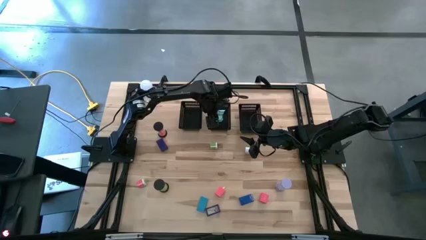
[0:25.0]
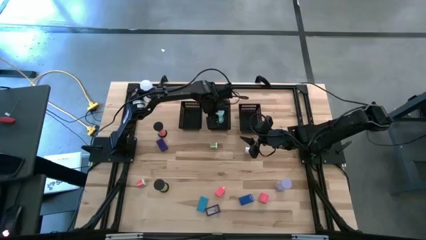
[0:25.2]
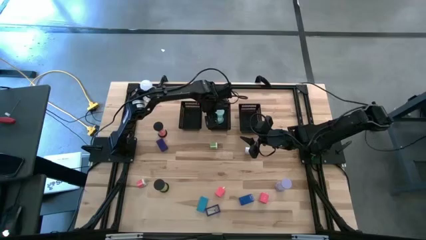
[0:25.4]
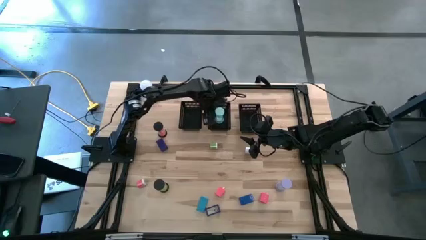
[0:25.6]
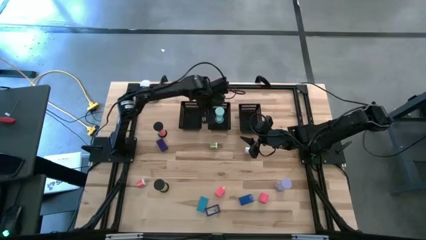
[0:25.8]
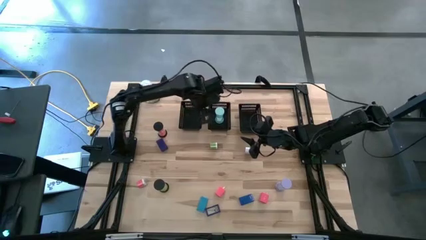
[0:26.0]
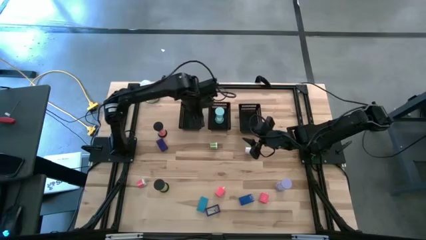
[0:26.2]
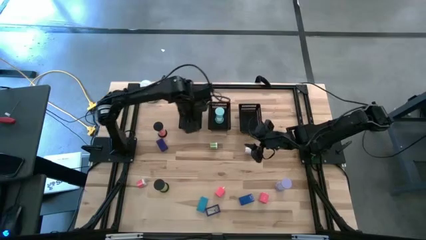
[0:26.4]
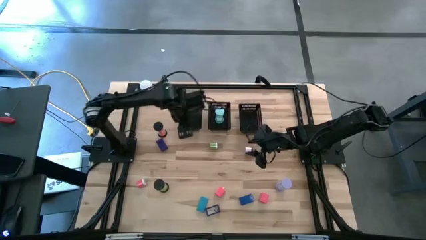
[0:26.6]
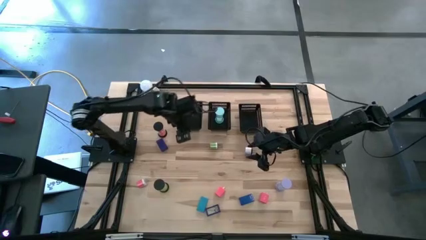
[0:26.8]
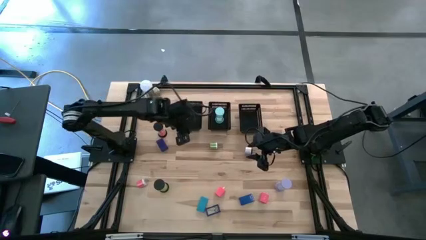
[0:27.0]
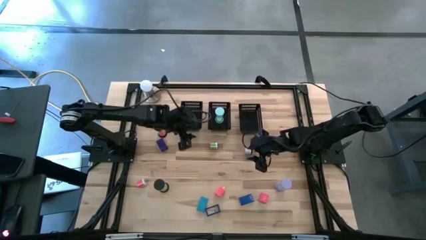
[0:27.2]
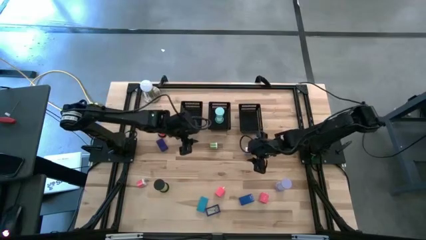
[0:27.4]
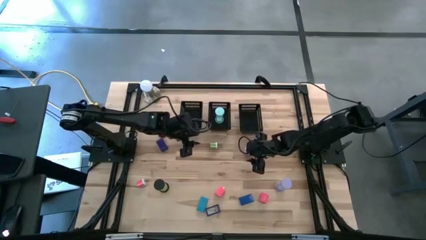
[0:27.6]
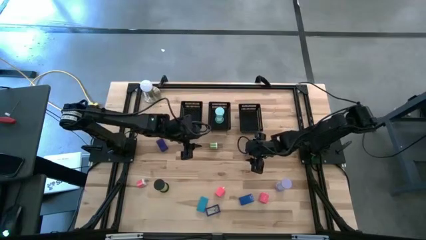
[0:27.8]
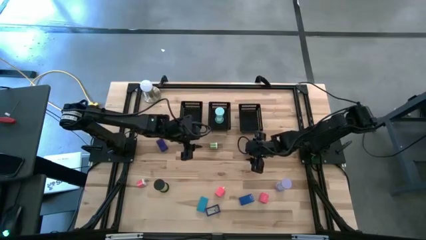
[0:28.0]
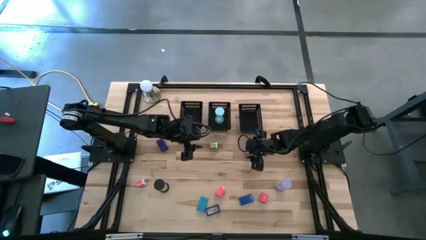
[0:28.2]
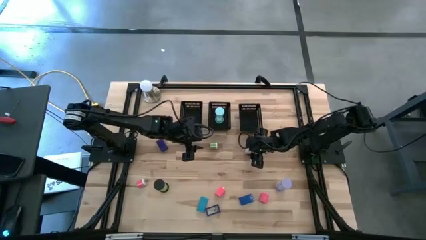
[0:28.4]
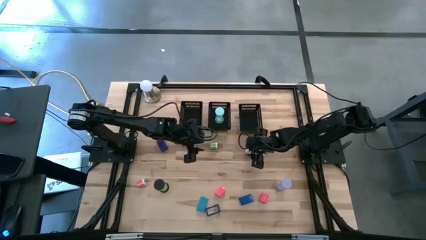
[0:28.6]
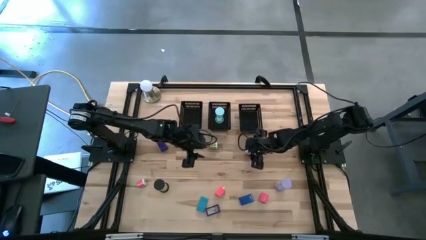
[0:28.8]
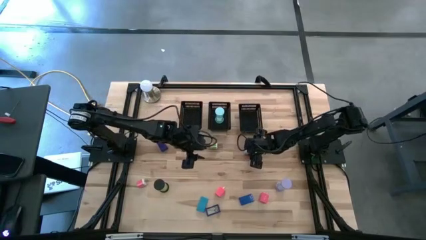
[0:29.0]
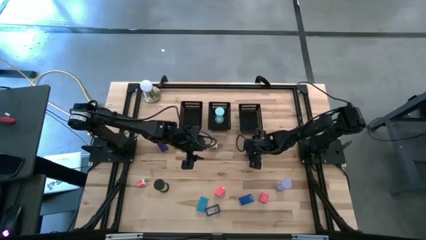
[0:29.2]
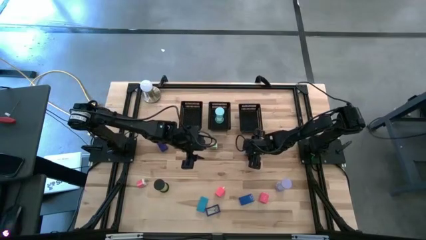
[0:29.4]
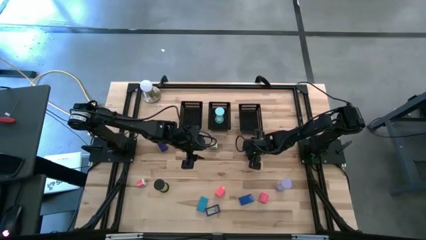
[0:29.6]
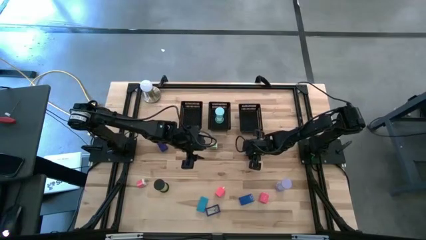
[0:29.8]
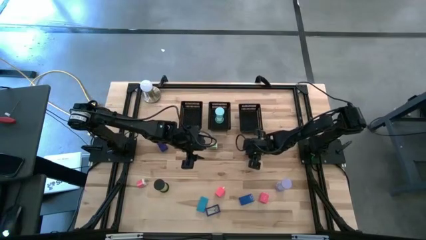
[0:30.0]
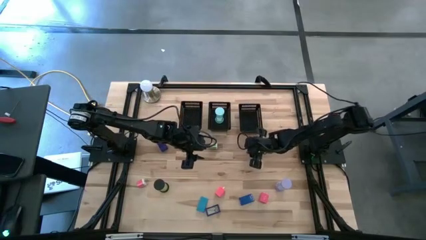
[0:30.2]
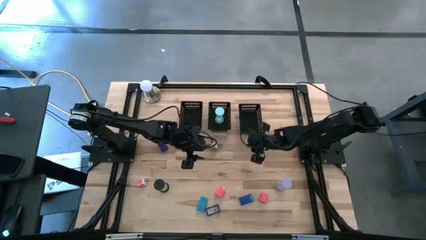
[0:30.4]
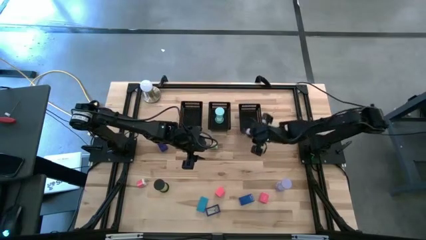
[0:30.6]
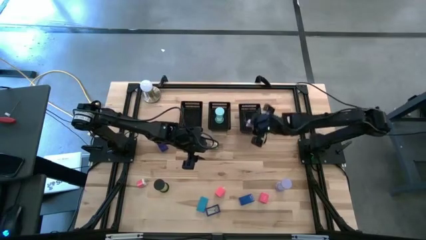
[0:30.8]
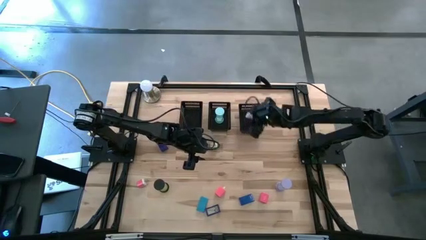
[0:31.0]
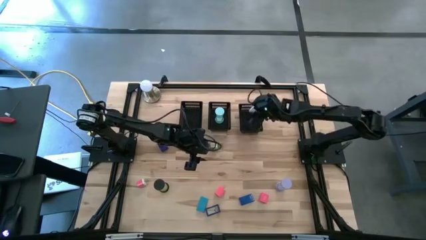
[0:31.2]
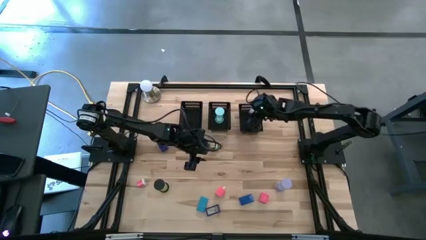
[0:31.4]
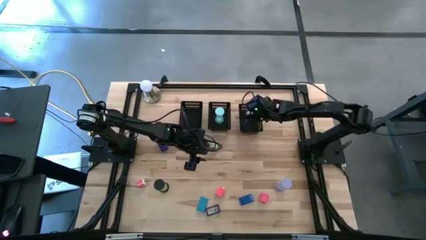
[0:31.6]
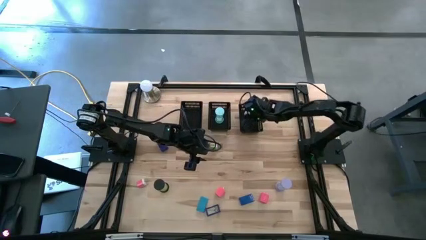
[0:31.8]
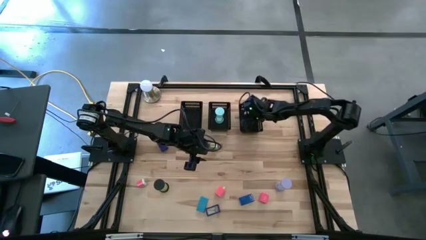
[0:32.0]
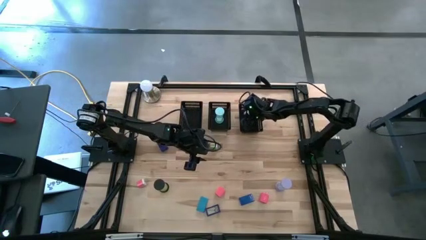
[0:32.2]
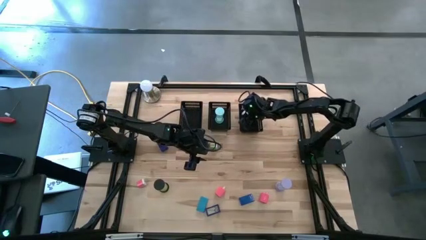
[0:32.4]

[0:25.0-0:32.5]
Task: Pick & Place Office items
Put the white charger charger adapter into the right black bin

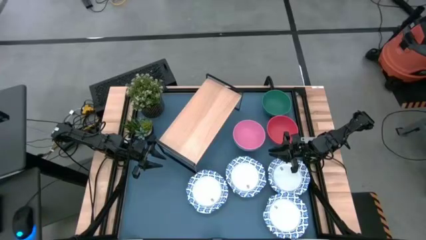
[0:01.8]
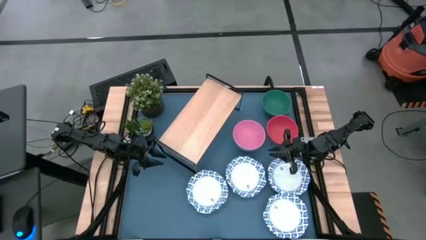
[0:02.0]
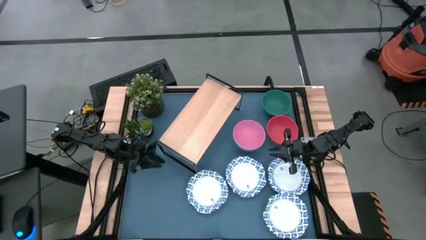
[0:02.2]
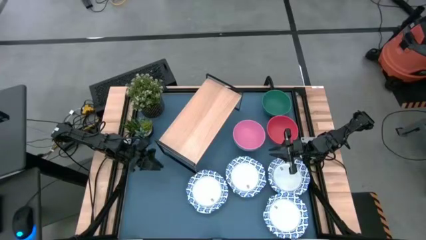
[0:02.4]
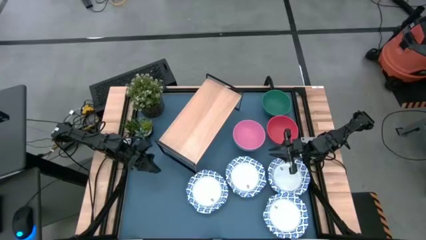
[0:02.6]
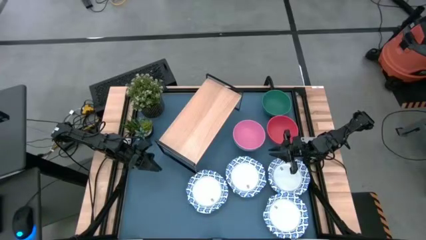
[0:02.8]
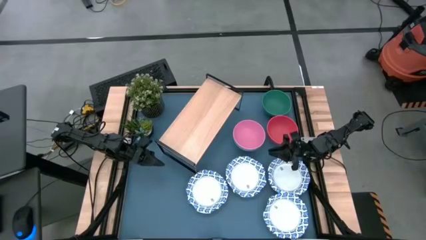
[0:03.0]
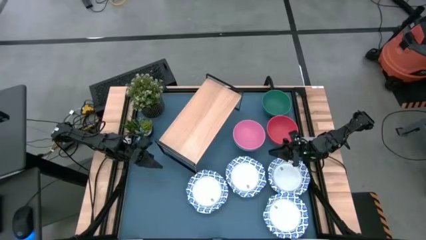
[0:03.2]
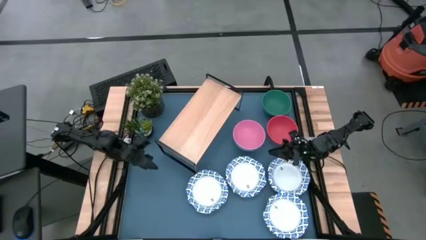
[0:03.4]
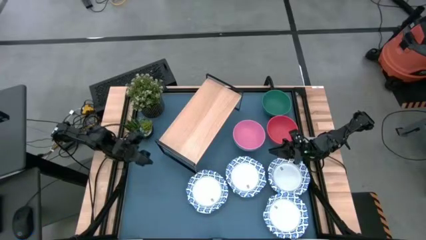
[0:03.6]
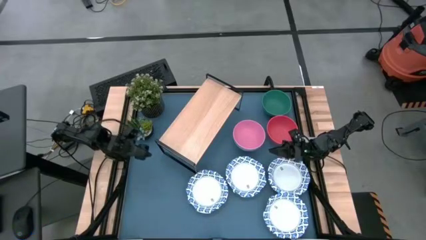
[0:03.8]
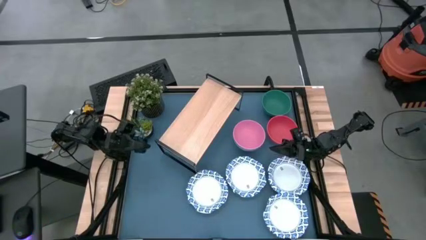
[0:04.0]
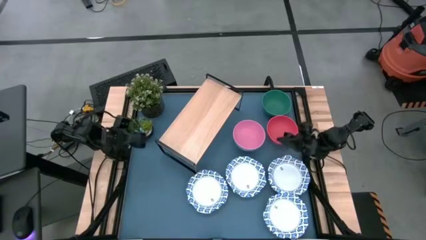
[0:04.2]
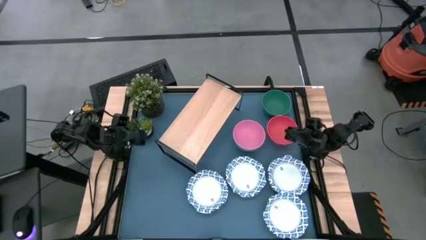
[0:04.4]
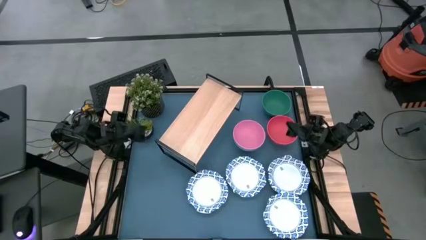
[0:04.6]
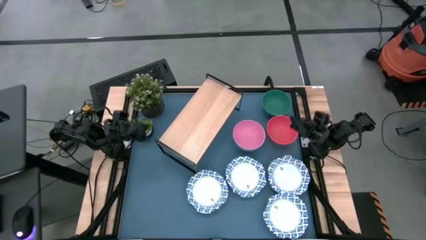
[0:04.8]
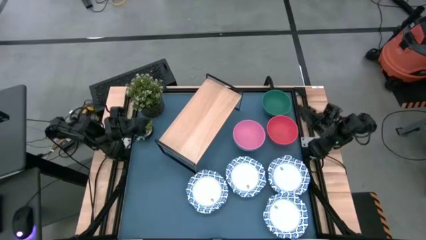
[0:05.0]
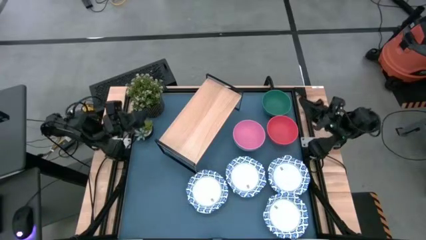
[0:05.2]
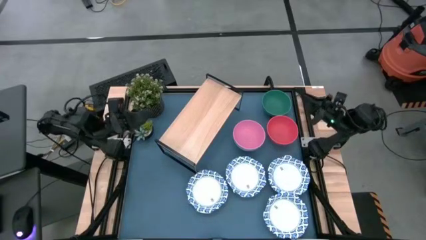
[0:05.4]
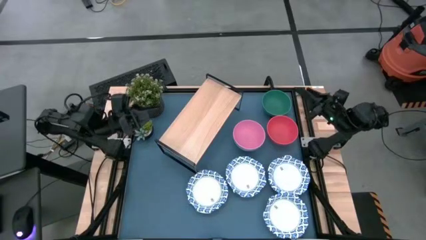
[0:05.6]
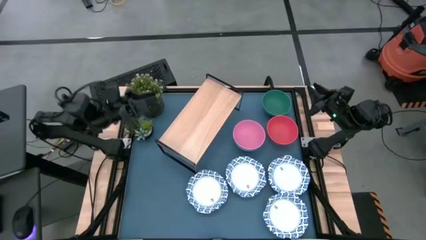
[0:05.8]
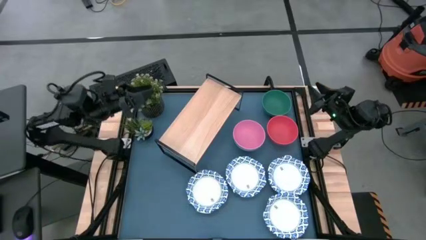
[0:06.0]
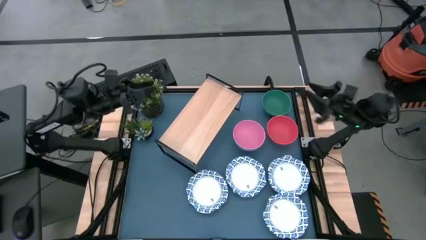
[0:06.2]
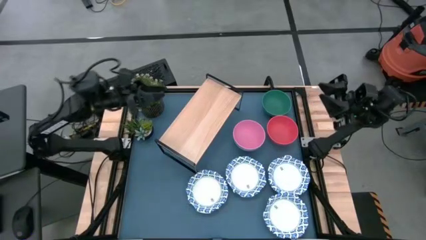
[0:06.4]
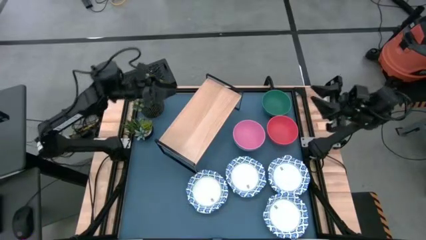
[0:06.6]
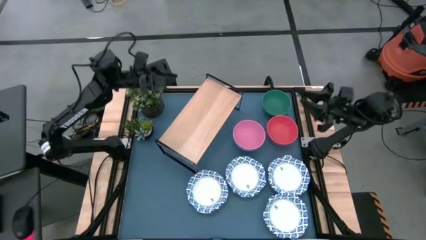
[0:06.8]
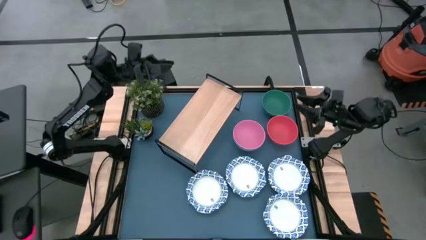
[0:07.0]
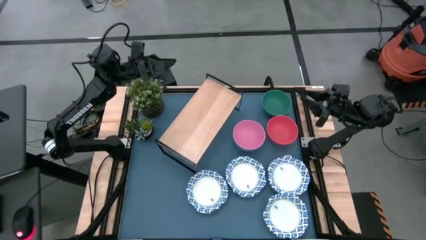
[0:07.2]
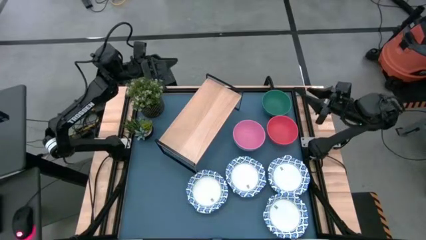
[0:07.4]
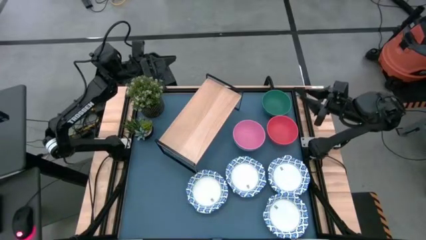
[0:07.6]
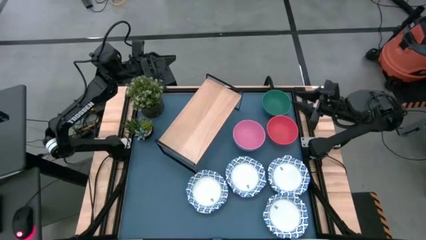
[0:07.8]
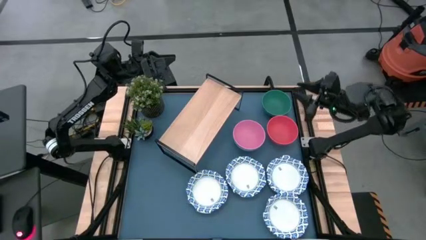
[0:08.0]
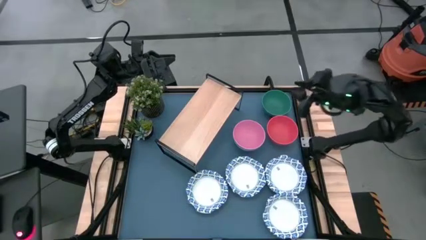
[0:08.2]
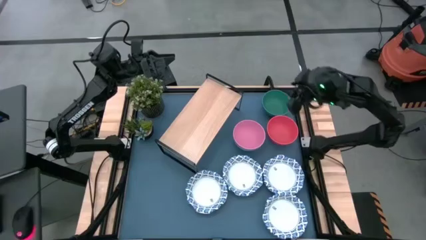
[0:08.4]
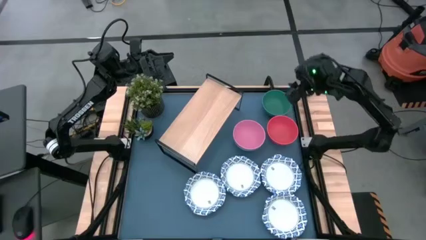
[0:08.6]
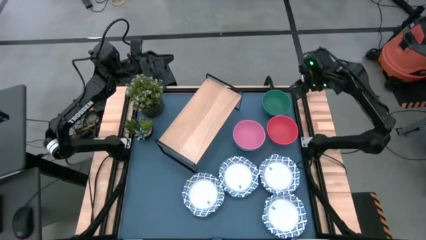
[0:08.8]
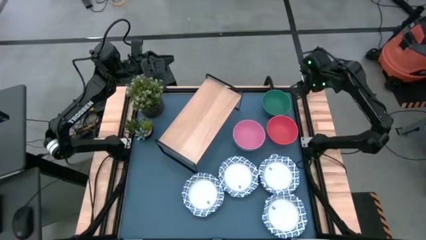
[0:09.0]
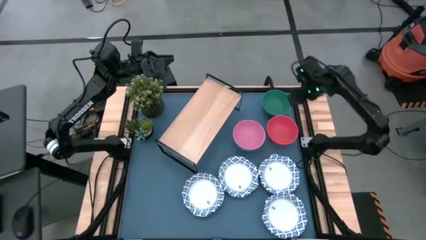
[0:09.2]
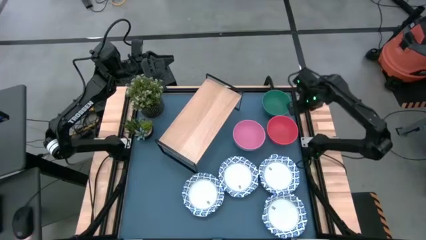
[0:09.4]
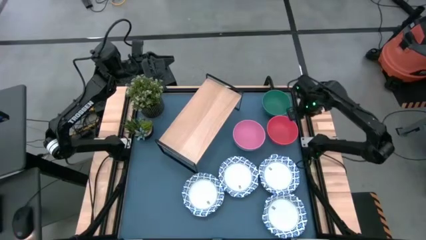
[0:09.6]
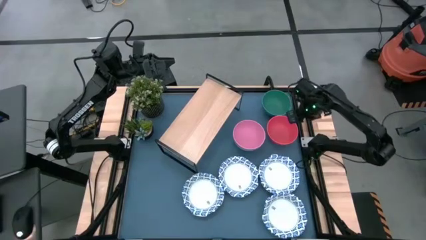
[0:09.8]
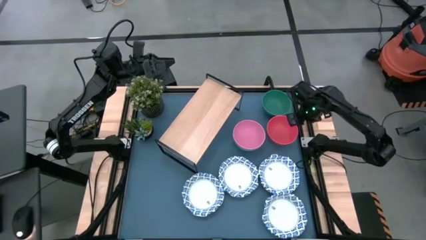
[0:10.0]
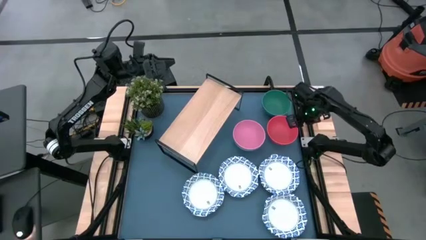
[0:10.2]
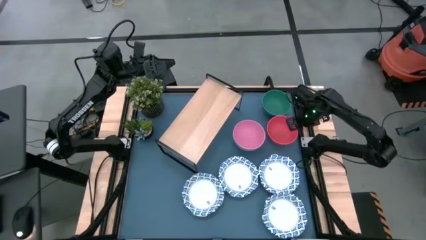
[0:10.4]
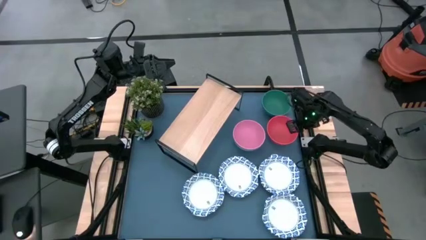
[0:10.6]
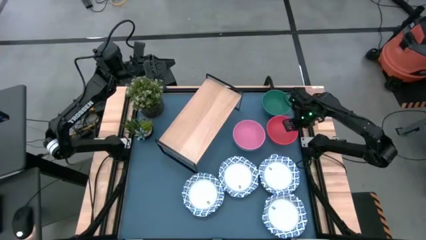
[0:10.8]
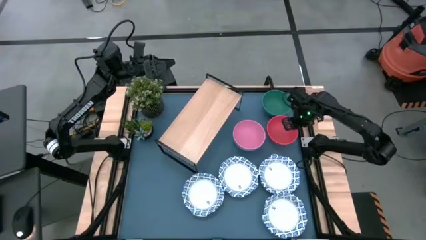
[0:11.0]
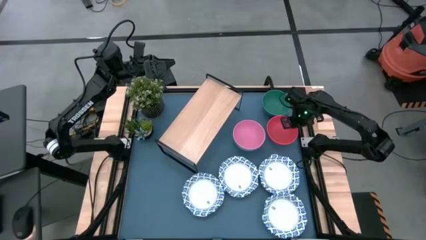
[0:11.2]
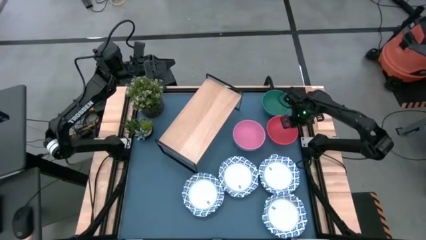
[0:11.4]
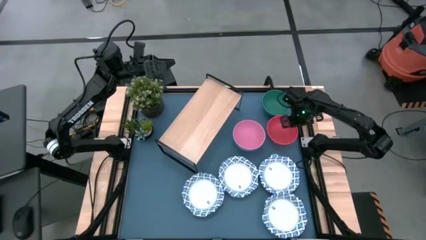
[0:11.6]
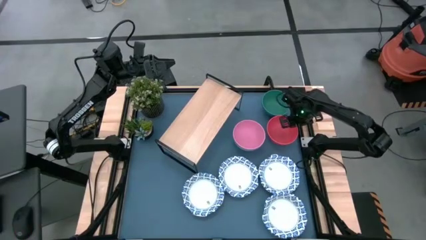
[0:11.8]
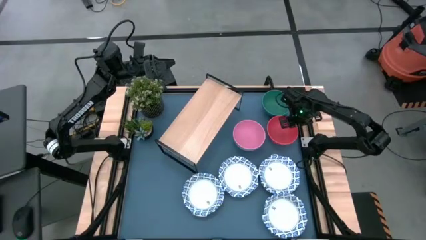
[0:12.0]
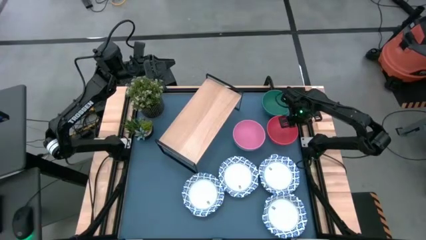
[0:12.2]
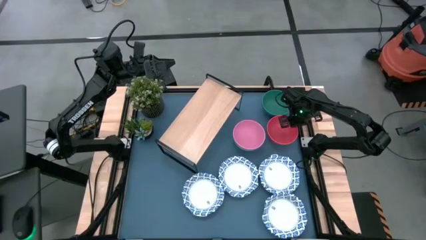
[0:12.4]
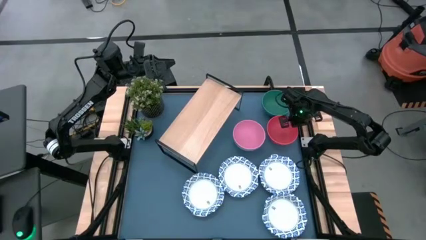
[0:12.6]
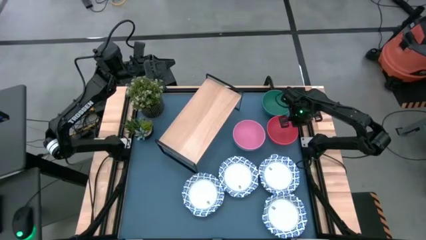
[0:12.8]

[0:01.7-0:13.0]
Task: Place and stack bowls onto a shelf
Put the orange bowl on the shelf
